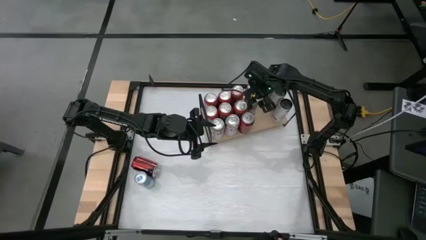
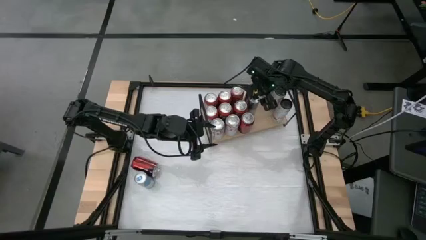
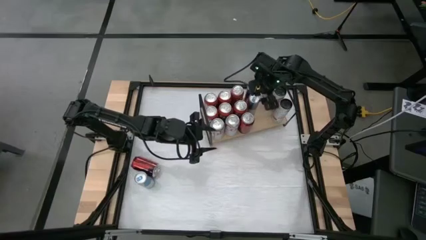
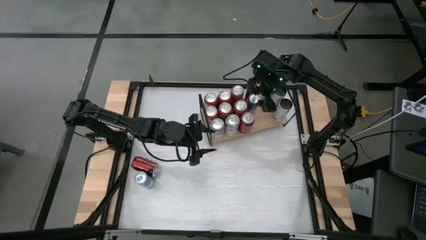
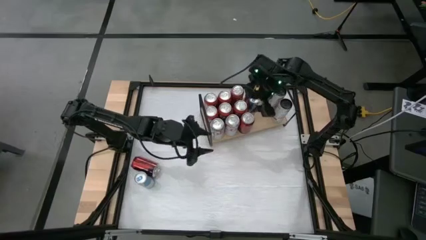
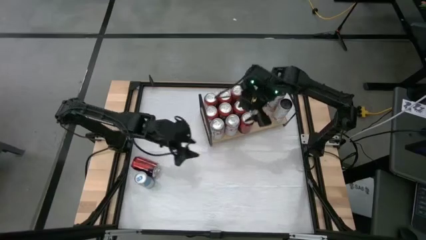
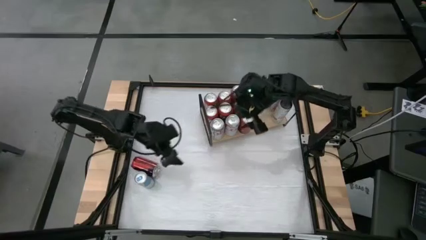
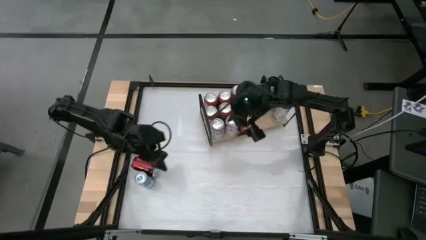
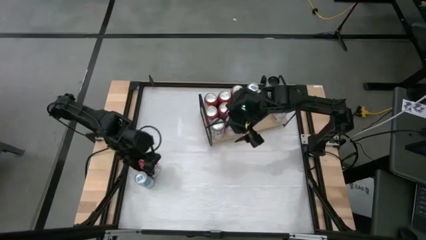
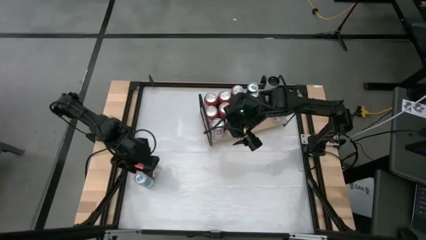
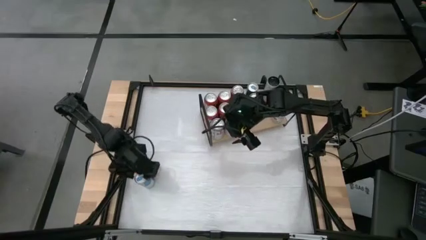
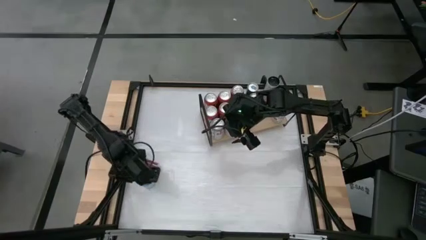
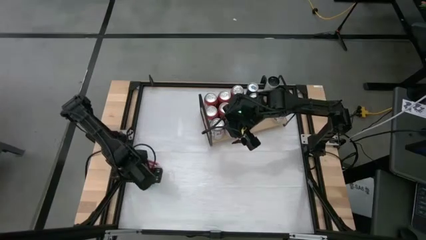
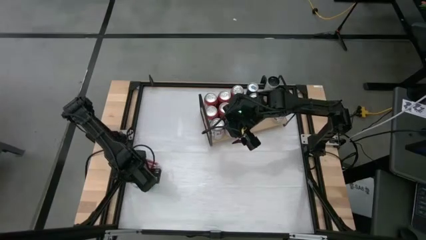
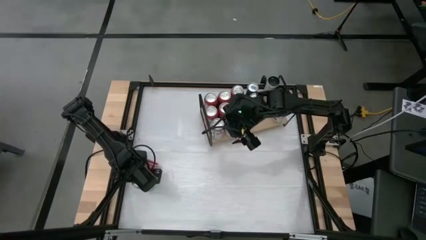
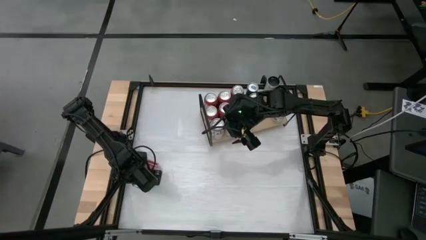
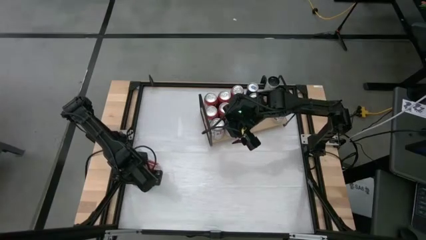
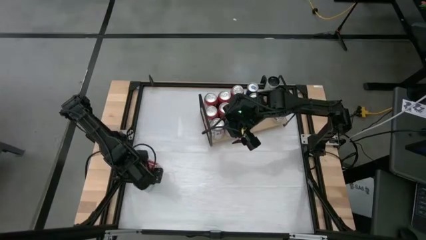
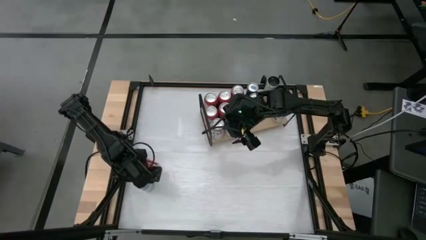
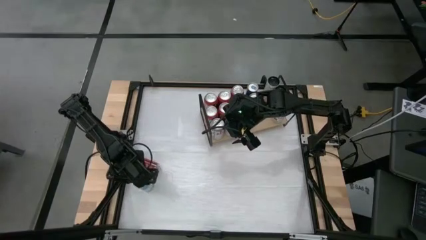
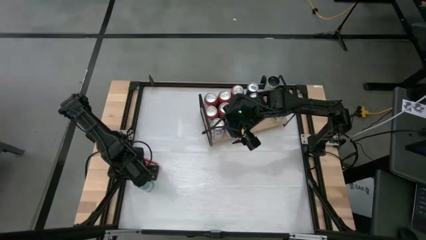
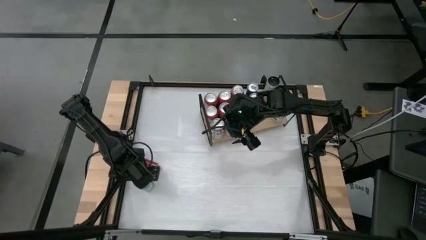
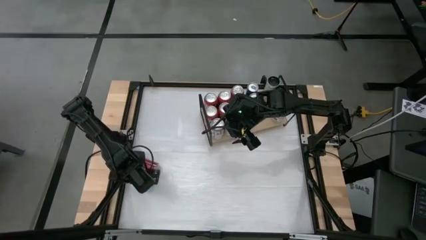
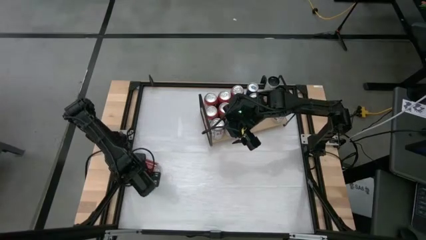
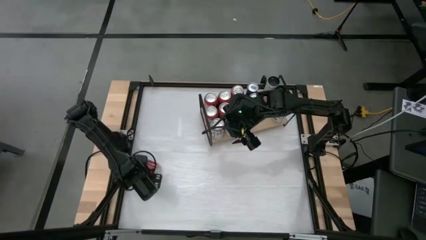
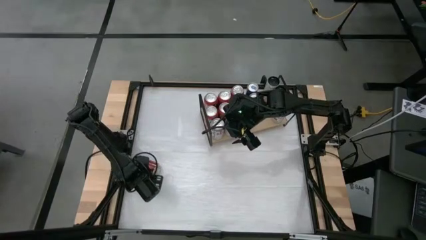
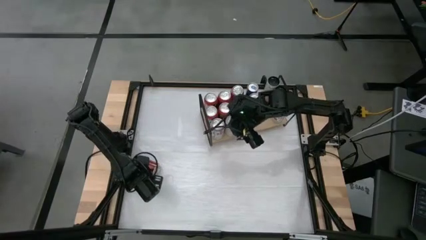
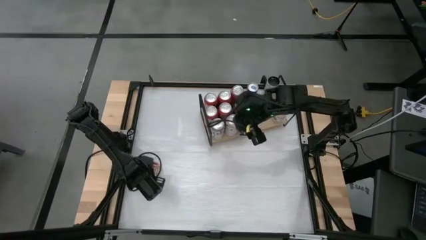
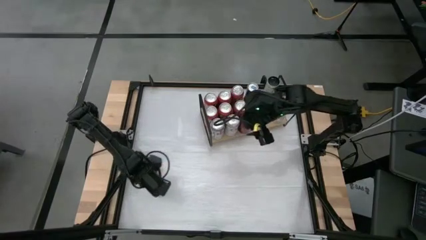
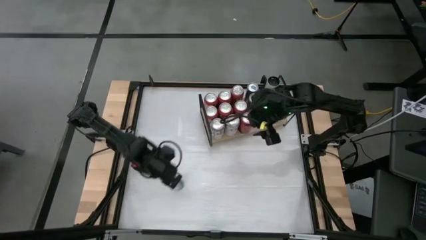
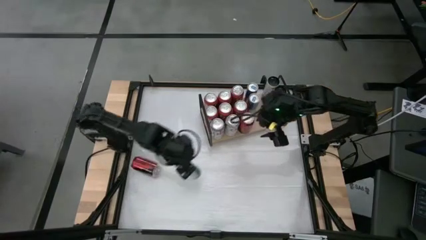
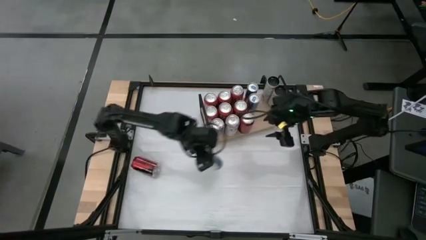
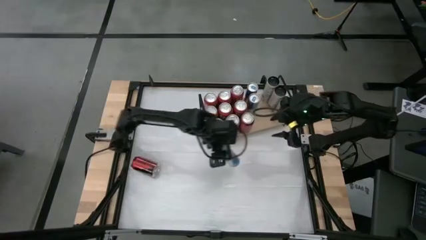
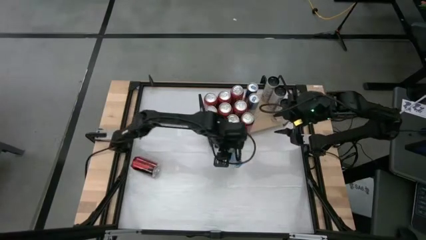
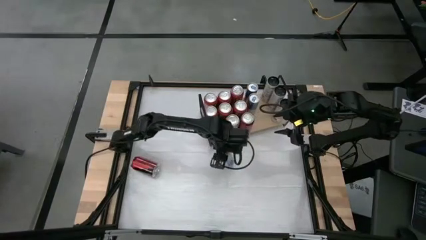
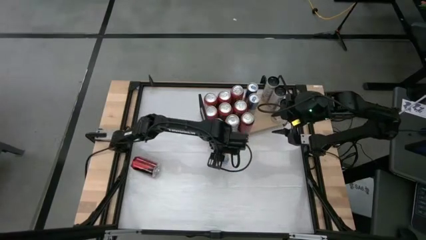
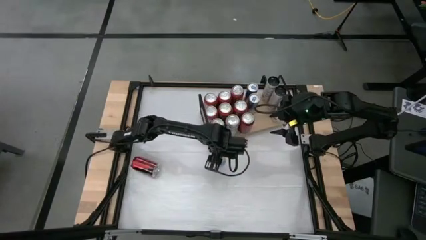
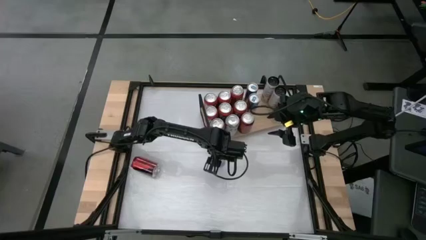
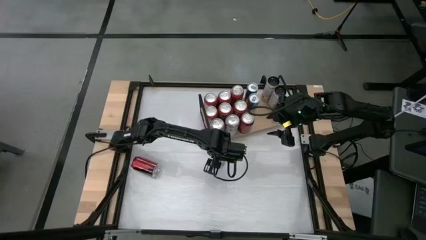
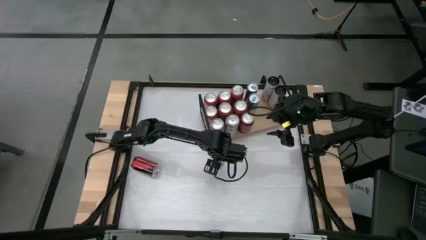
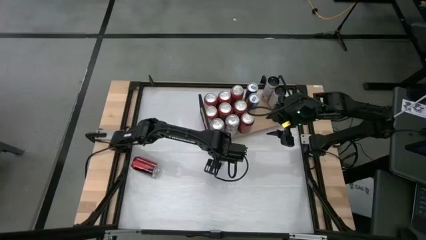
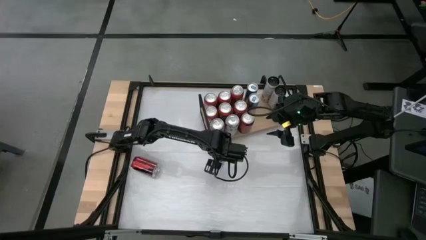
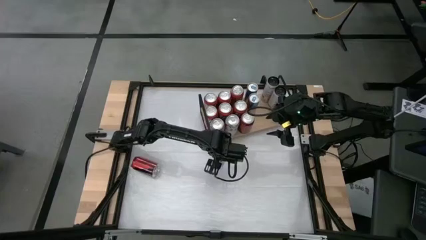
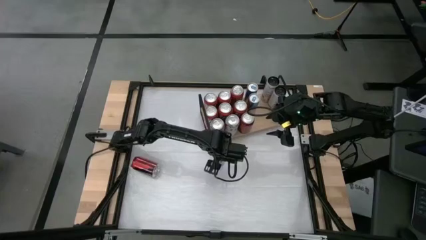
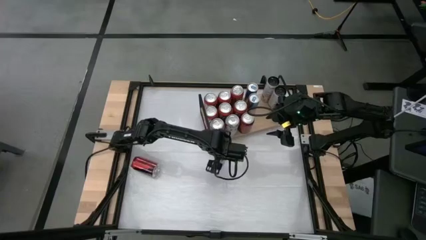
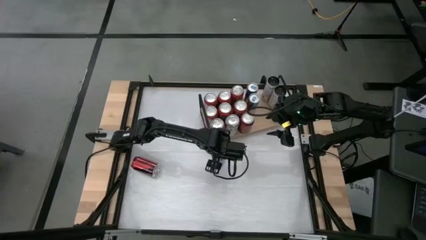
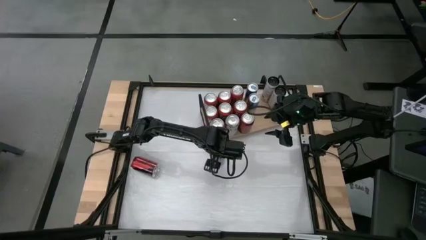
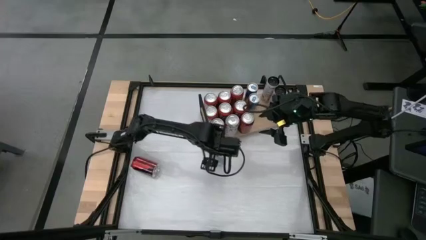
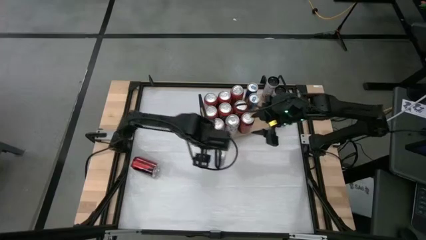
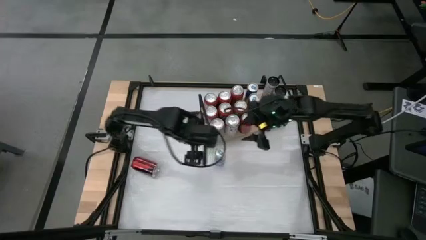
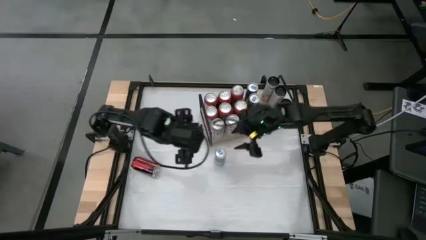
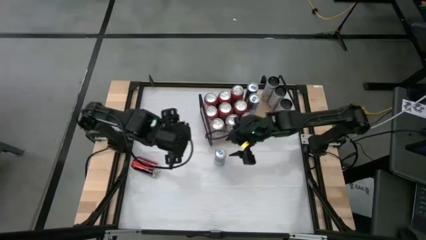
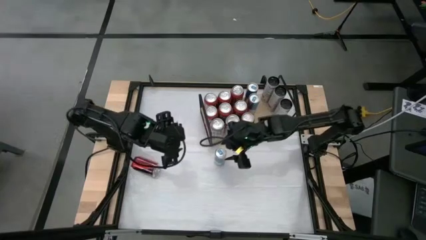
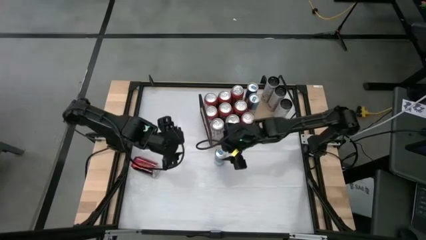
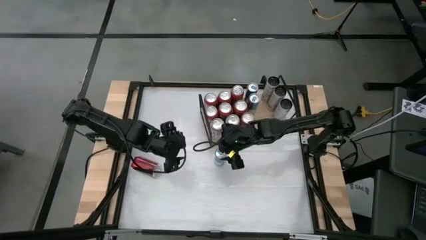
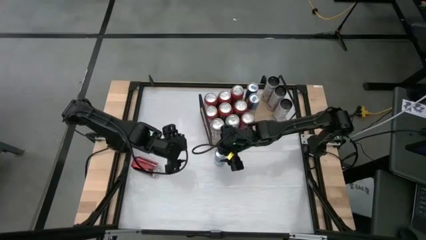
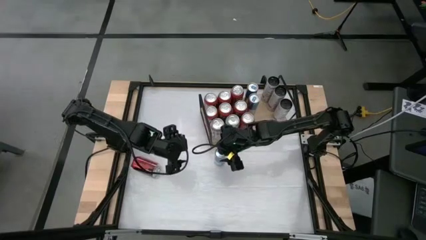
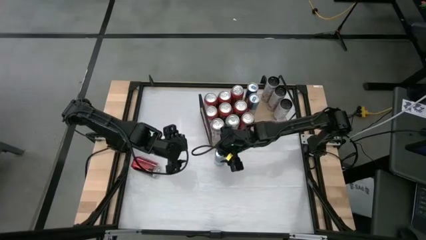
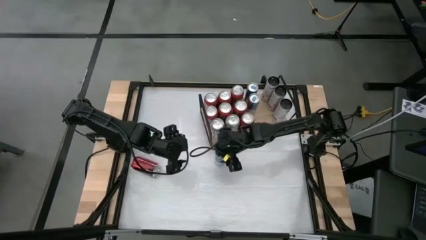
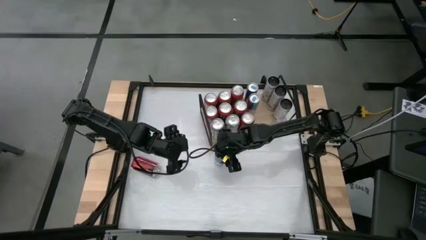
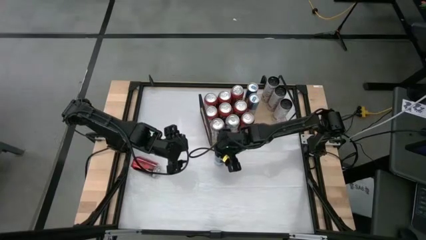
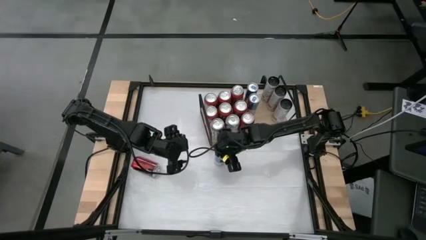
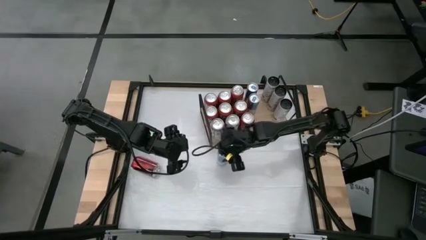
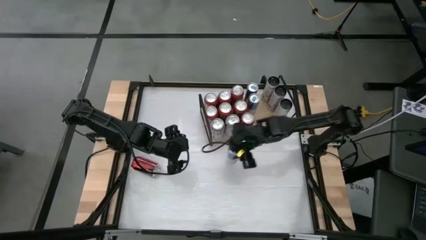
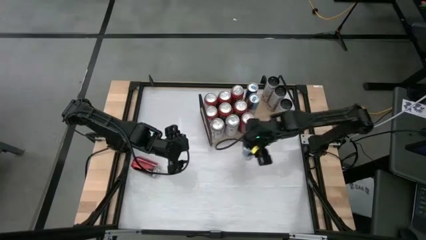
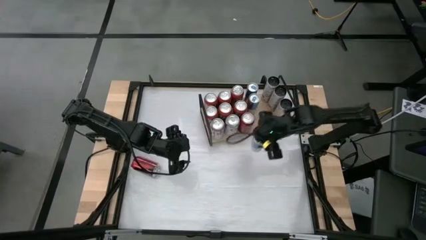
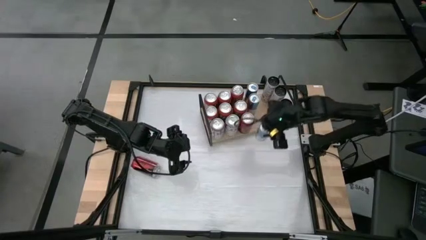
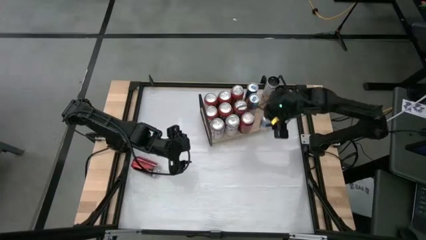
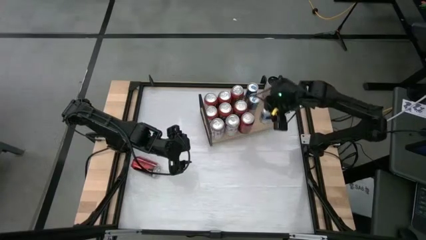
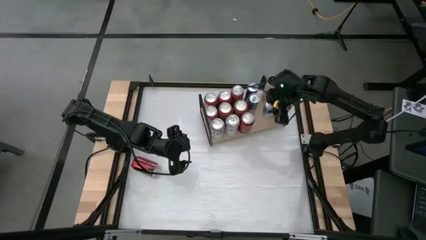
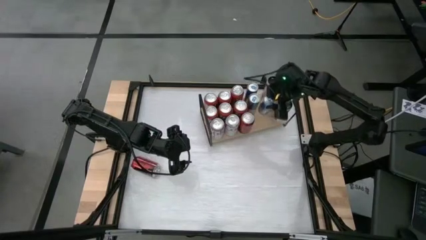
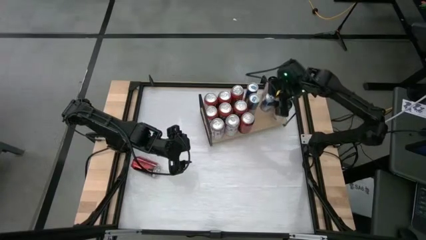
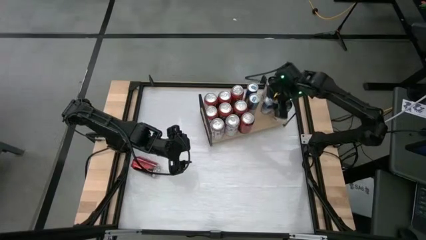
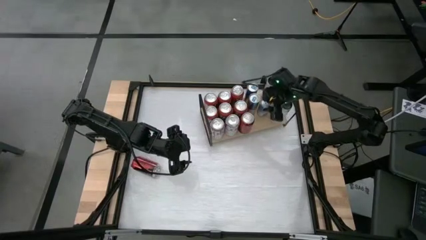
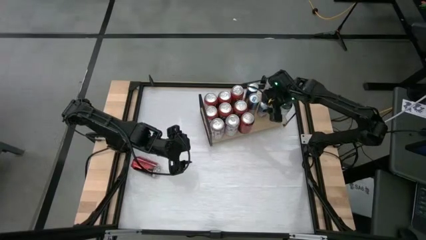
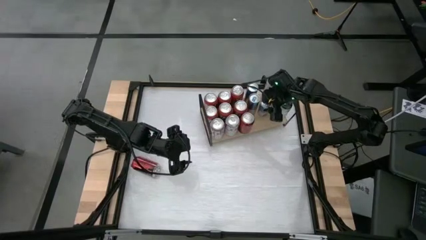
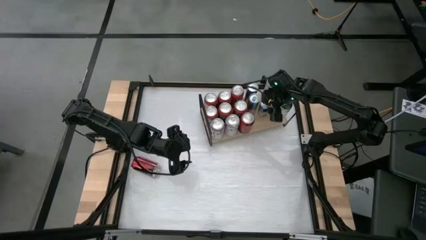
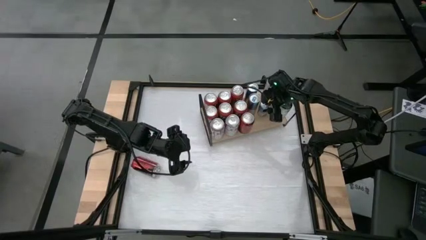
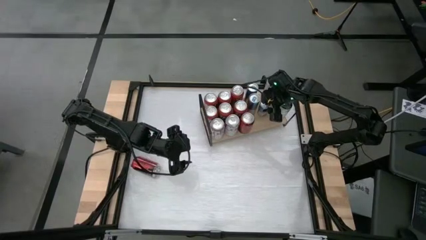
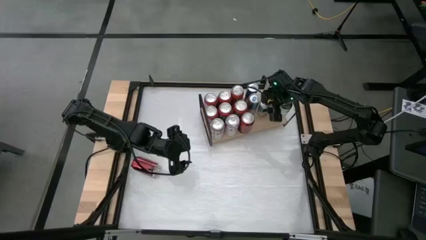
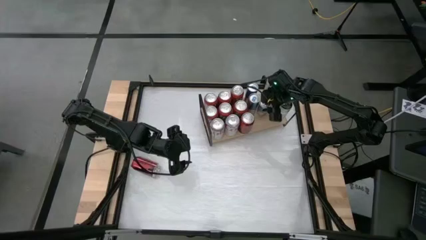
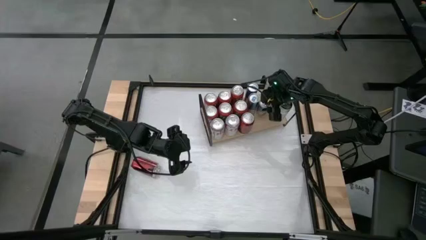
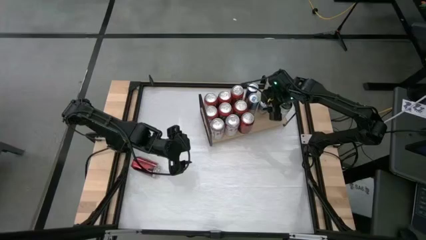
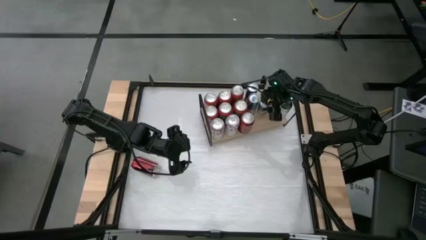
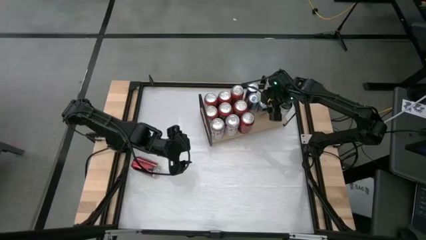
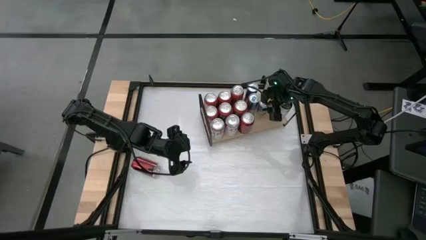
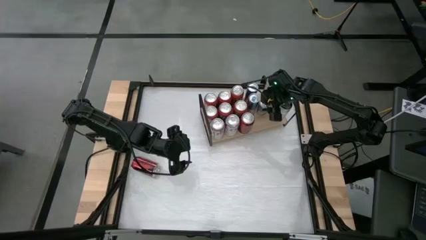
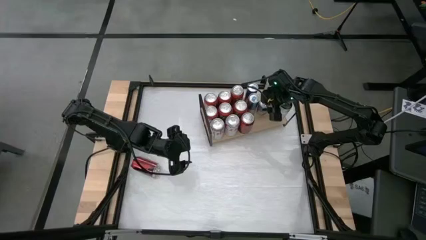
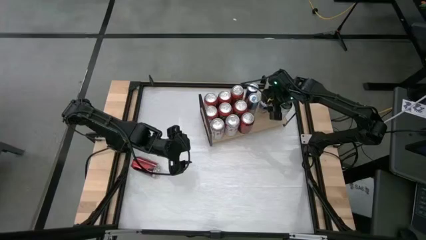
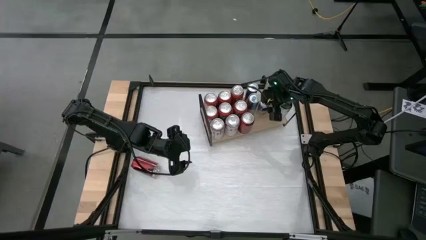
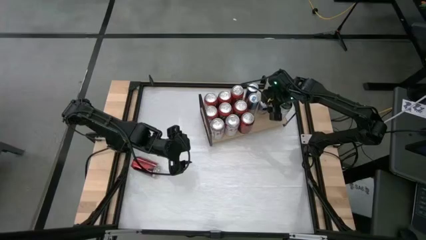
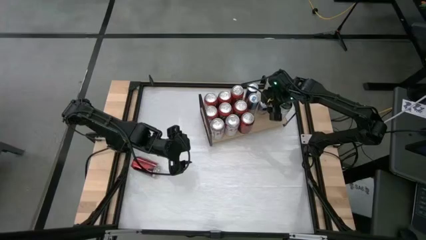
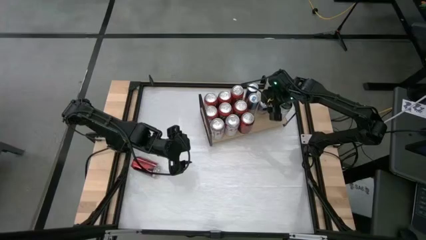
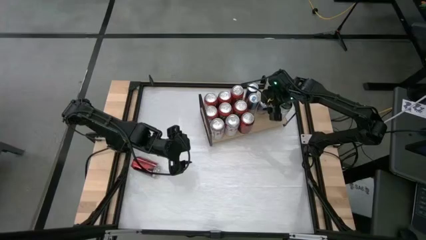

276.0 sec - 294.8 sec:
Task: Place canned beverage on shelf
Put the blue soda can on the shelf
